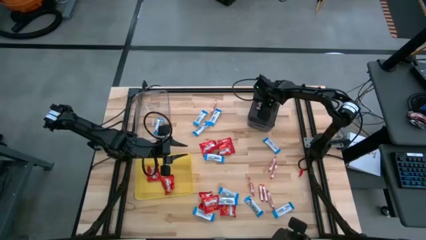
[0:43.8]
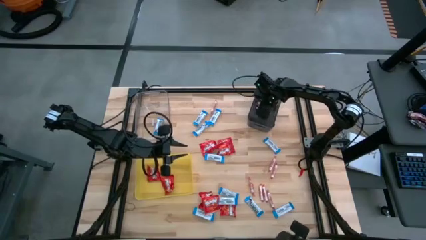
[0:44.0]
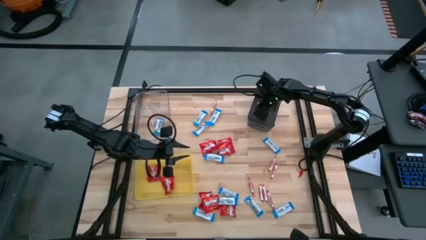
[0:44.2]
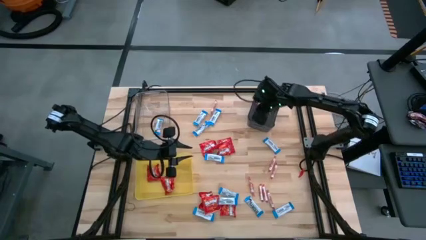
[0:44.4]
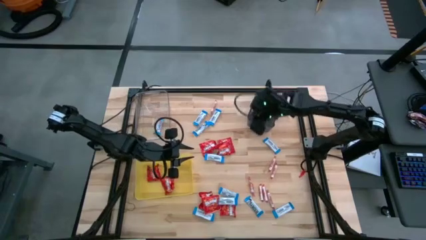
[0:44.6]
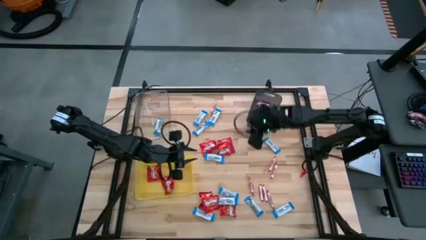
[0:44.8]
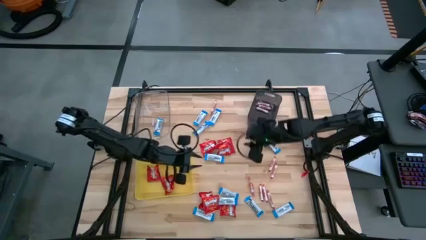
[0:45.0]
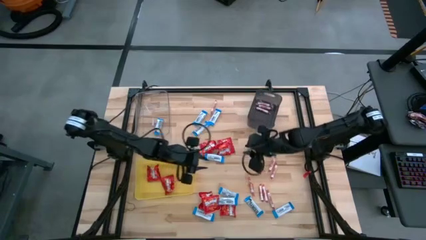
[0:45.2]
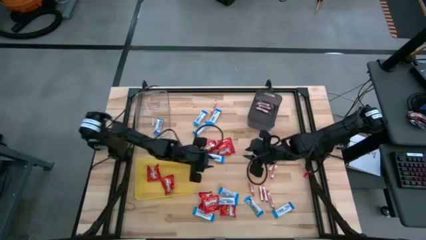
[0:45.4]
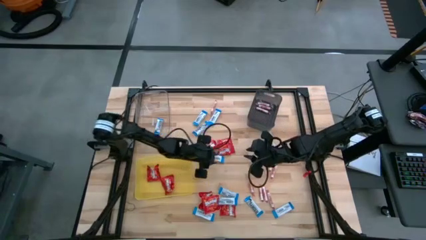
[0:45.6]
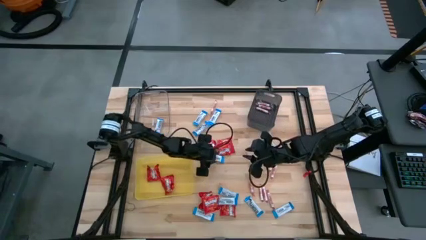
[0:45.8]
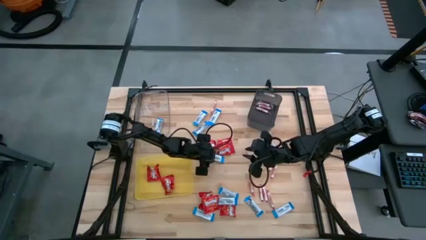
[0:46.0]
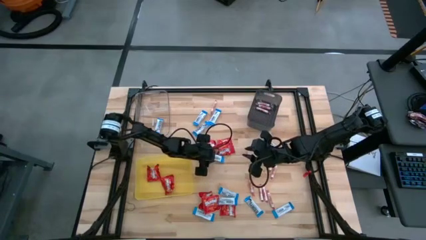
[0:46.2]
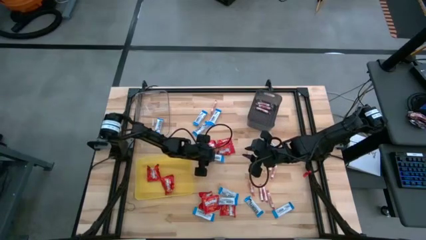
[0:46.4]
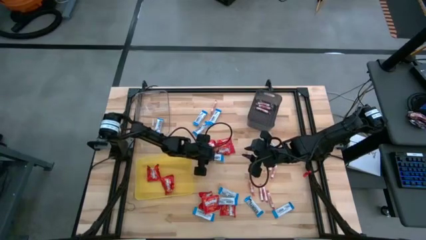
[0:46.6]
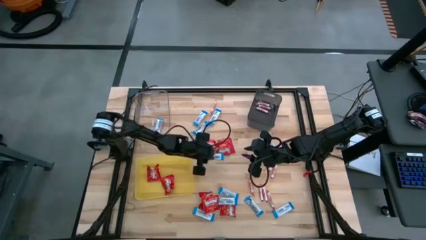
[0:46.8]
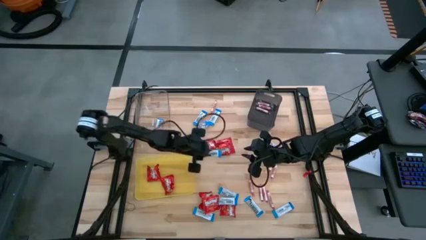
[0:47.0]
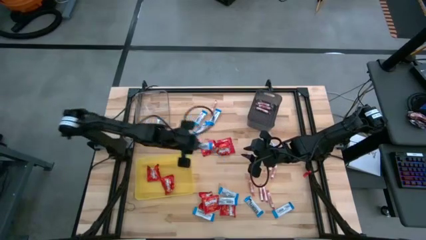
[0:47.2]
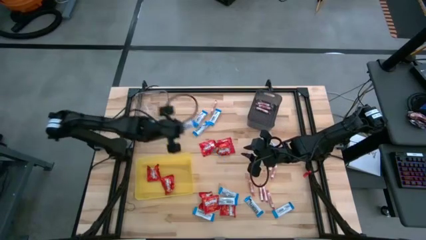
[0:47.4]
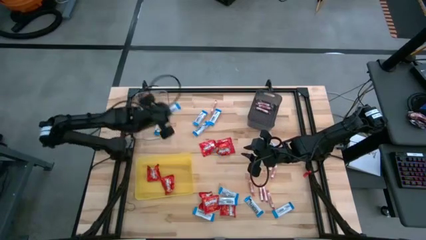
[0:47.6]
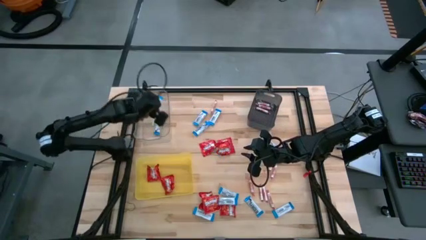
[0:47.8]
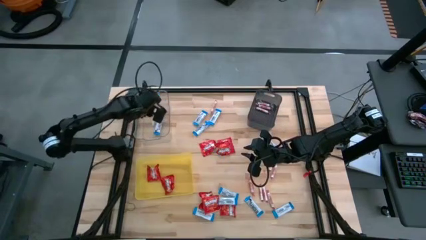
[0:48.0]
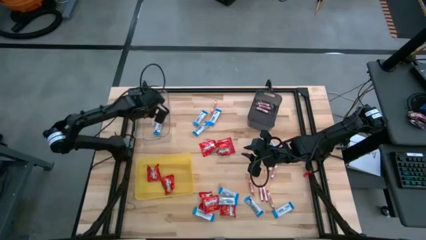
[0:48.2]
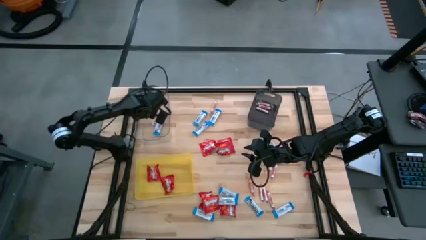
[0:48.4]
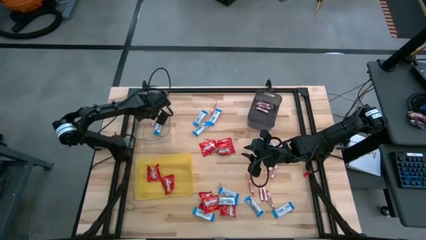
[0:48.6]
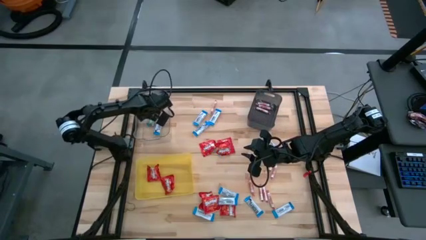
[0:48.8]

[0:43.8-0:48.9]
Task: Sort candy
Put the blue chocolate into the transparent bin

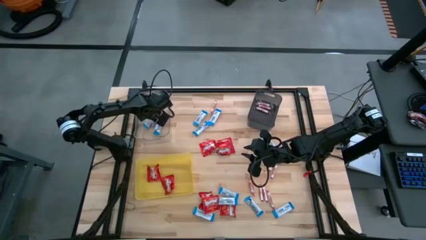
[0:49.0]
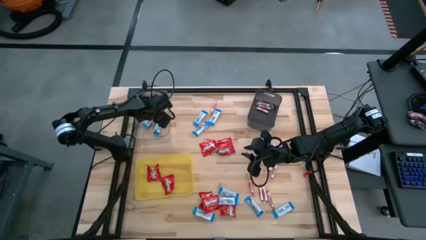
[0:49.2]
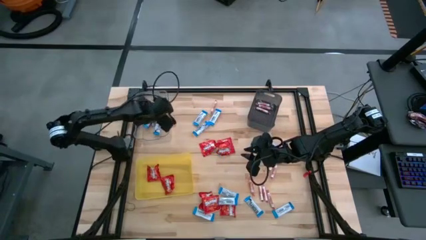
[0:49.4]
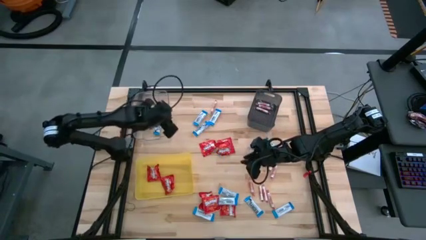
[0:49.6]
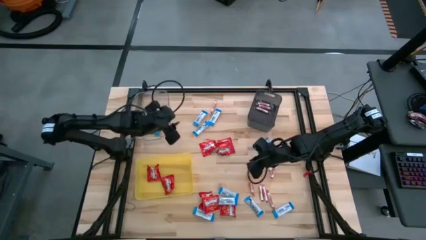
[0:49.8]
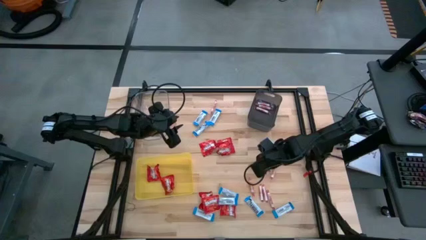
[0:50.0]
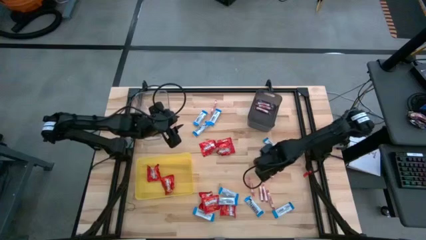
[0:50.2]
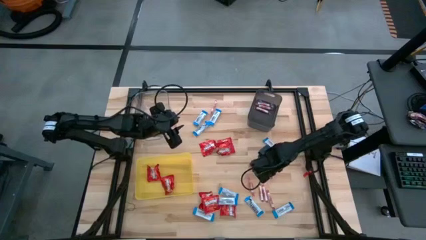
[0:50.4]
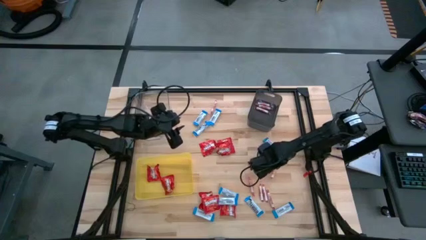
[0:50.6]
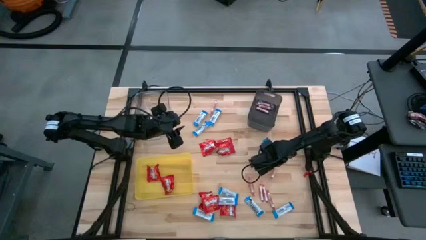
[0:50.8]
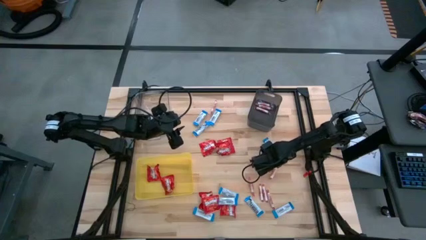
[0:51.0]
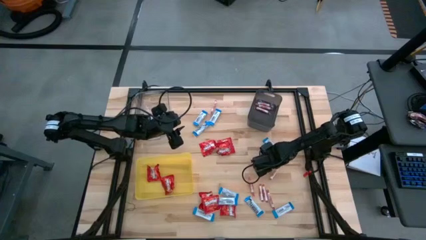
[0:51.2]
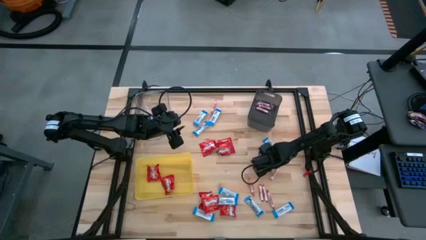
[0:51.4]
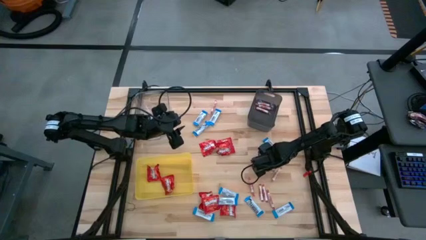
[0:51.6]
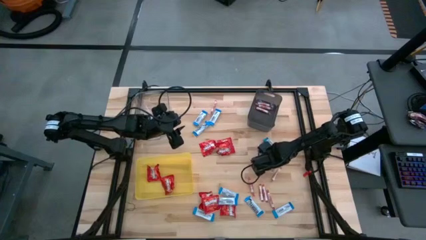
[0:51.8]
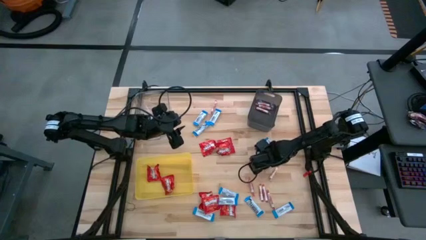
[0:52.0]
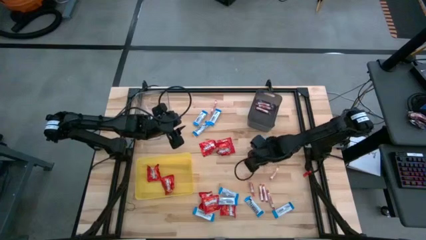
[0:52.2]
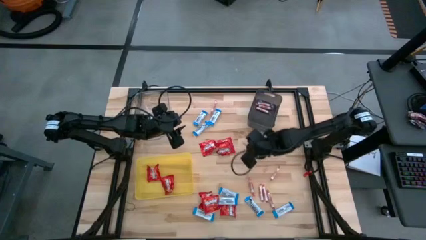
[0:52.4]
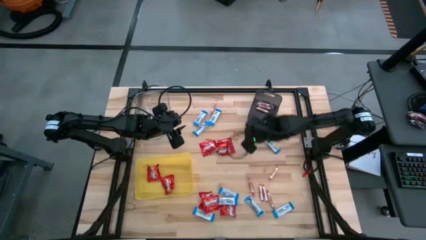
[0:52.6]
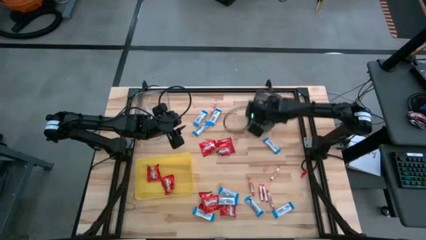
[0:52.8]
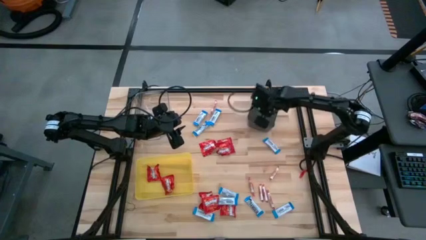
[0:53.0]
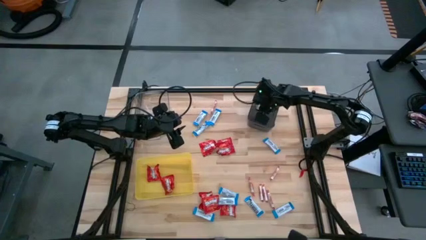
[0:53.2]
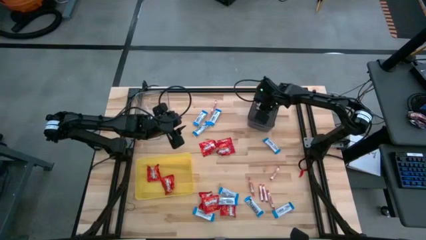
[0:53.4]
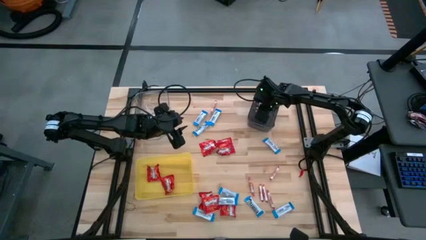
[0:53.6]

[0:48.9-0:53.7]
Put the white candy into the black bin

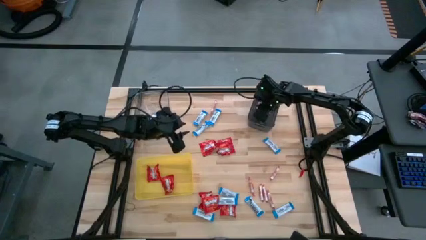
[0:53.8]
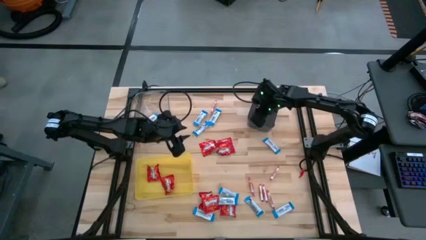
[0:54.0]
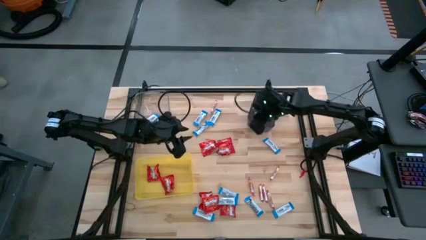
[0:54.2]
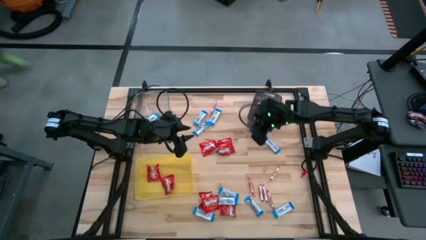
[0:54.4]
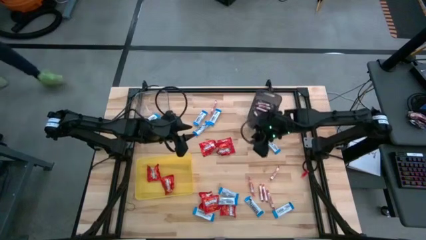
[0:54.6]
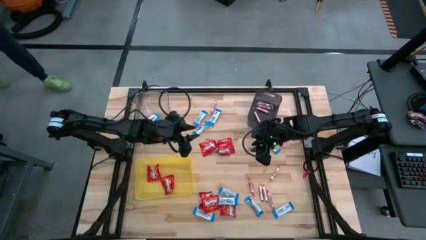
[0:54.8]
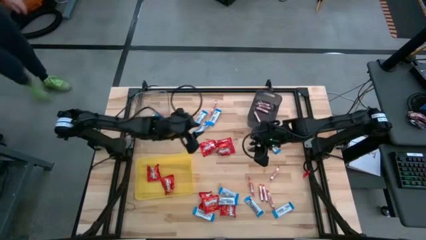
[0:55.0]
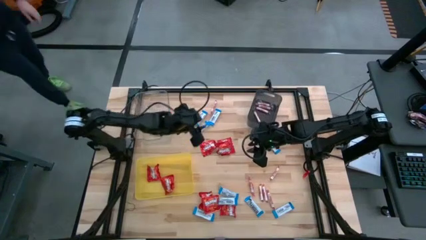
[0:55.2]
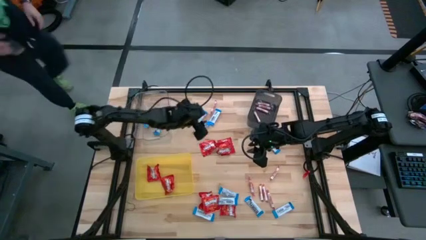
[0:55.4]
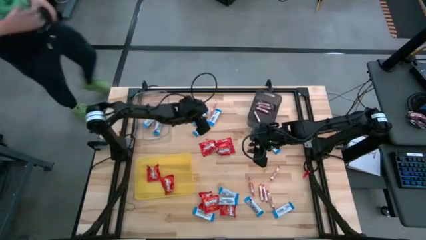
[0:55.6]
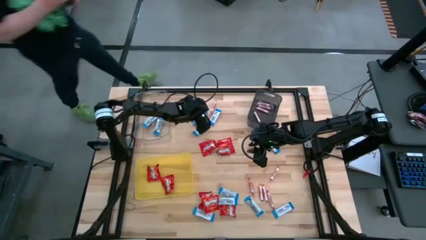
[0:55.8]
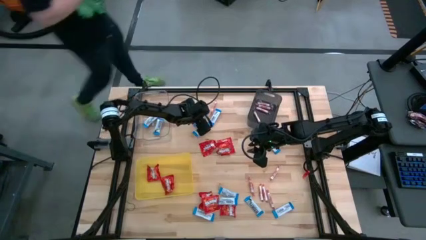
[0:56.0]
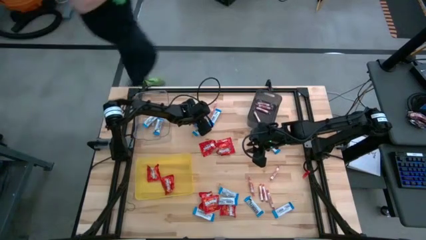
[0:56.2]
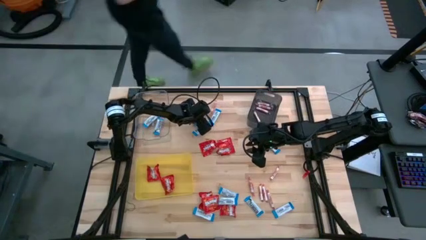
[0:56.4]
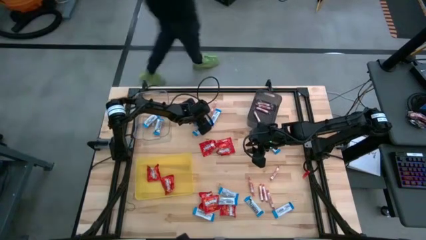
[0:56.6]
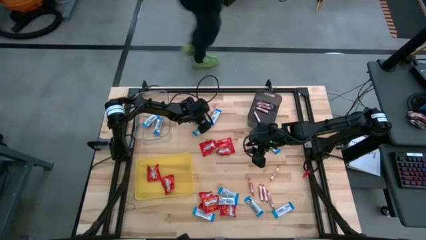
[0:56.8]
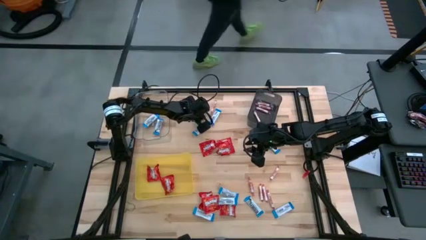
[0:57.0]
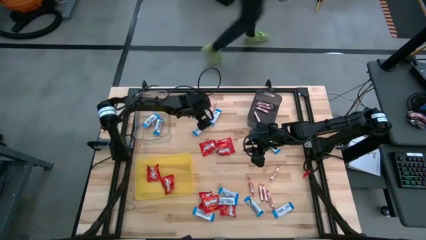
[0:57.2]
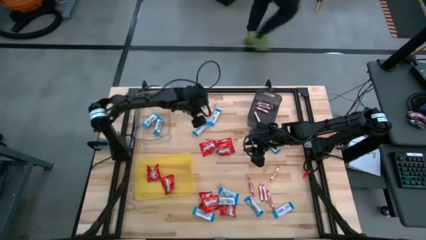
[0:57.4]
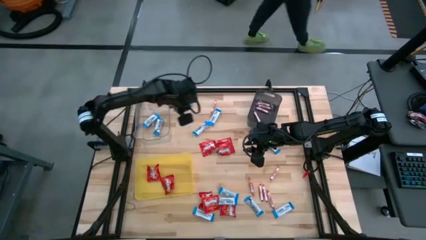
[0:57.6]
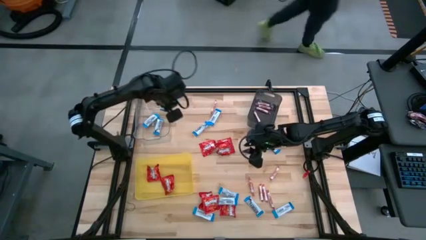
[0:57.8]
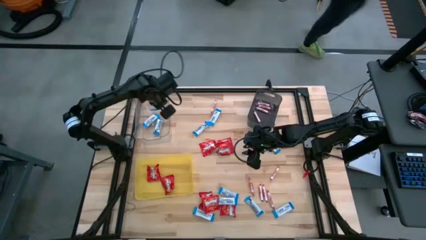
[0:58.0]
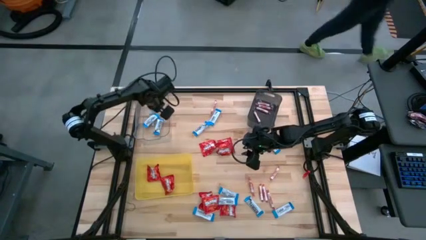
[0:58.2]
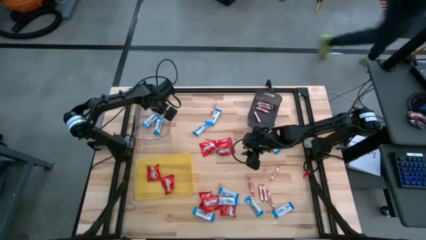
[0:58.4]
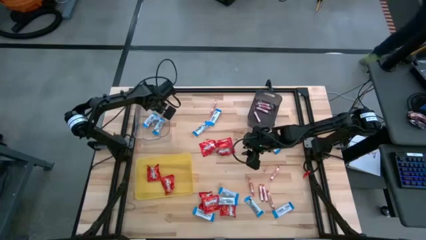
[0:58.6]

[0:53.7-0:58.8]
Put the blue chocolate into the transparent bin

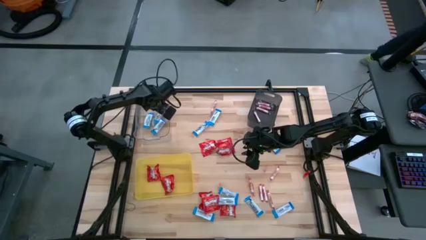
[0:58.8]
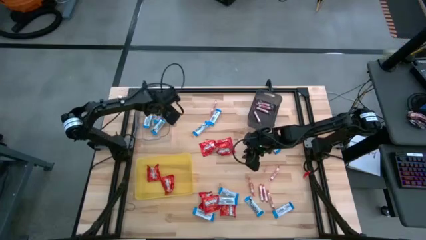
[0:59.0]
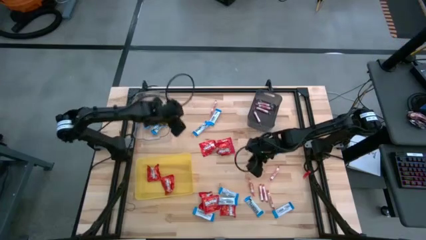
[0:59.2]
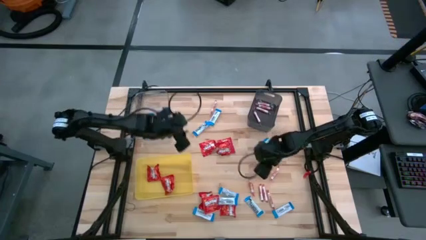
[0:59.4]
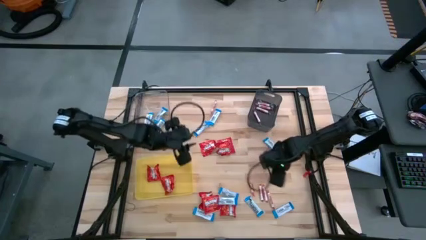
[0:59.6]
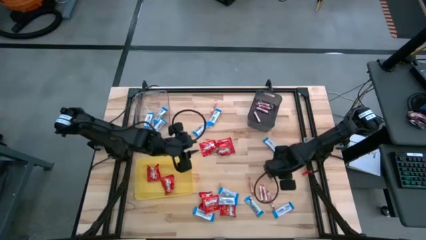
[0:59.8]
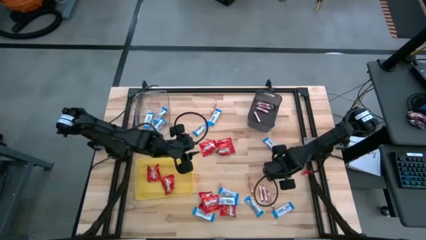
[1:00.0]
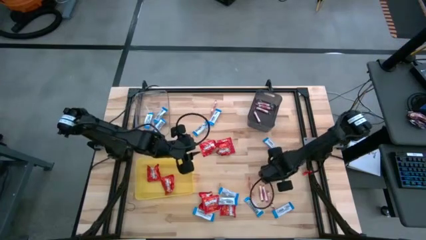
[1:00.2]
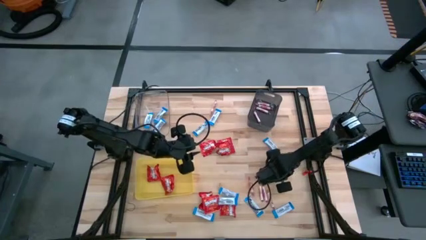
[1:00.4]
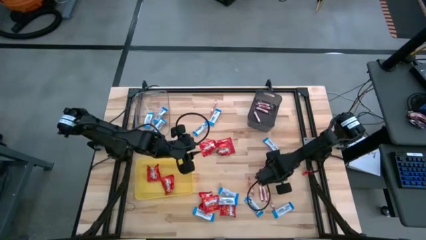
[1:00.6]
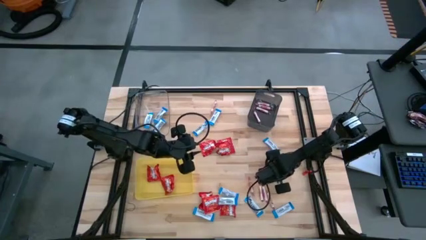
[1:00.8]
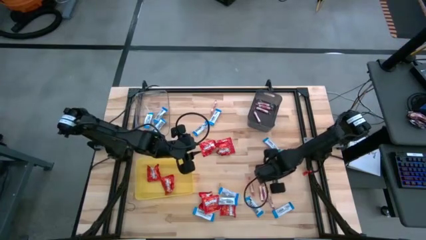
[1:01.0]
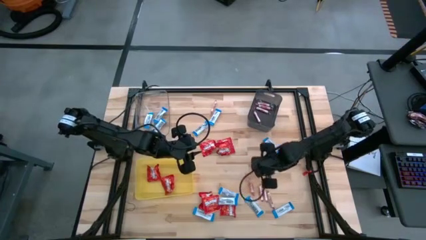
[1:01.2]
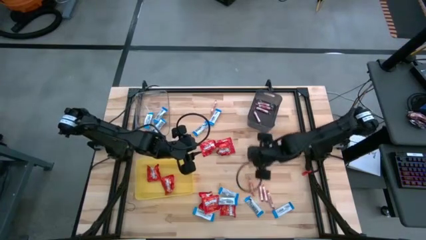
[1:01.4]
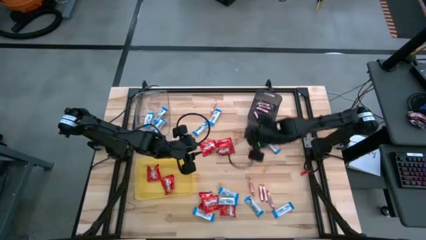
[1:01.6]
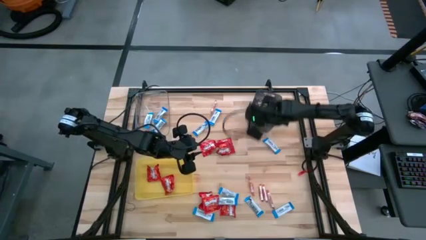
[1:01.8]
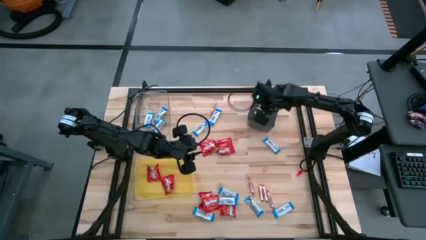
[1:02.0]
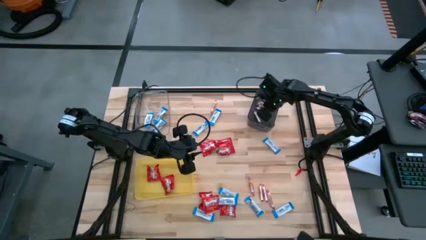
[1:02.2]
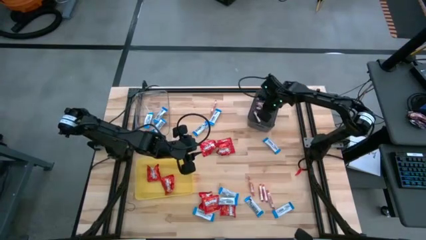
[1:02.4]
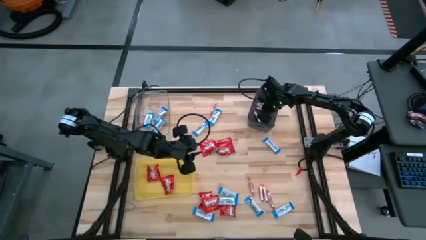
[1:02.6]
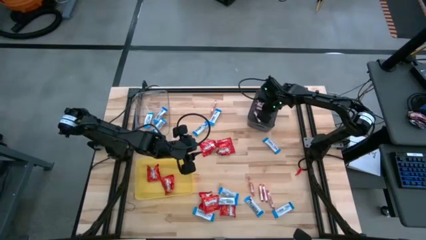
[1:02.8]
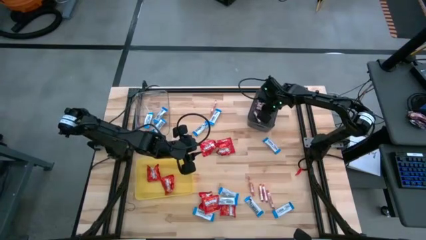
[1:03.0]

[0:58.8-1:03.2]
Put the white candy into the black bin
